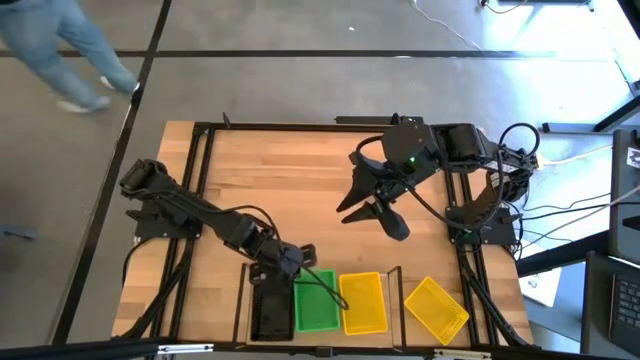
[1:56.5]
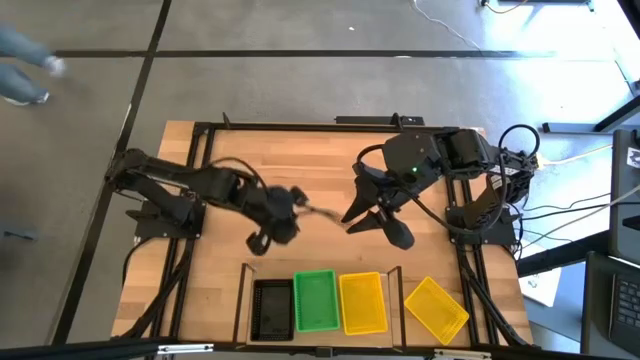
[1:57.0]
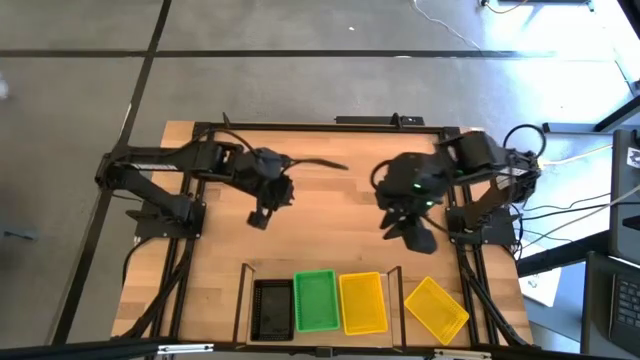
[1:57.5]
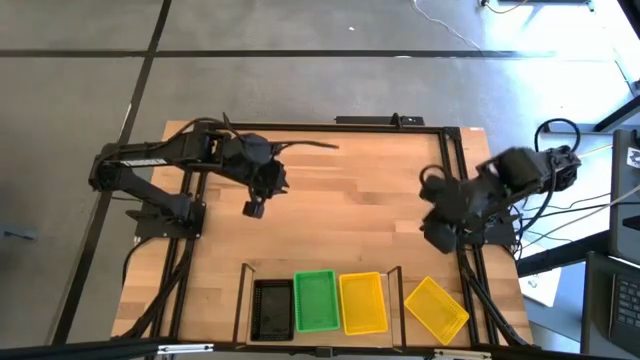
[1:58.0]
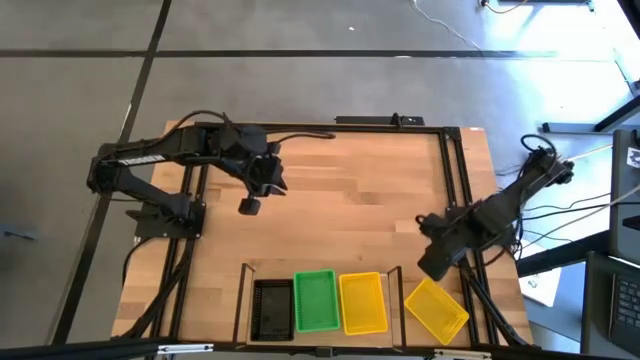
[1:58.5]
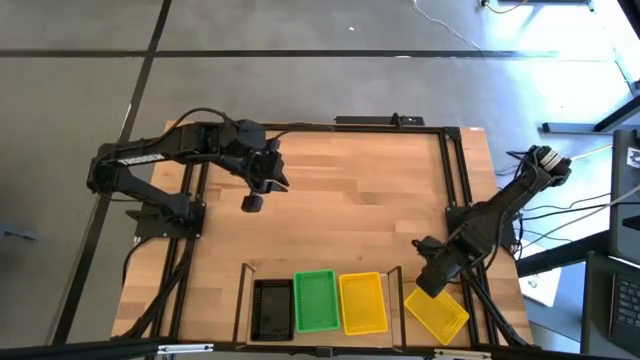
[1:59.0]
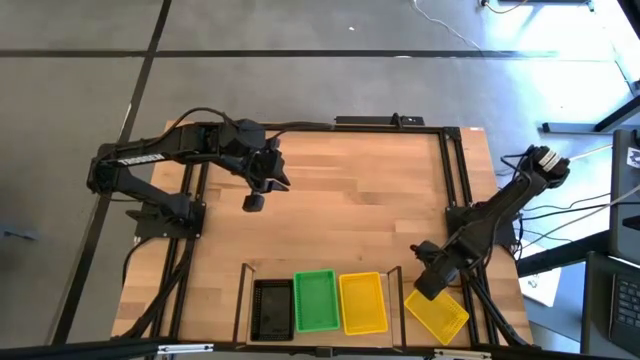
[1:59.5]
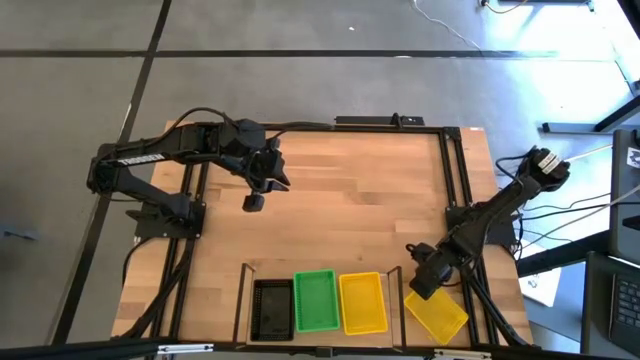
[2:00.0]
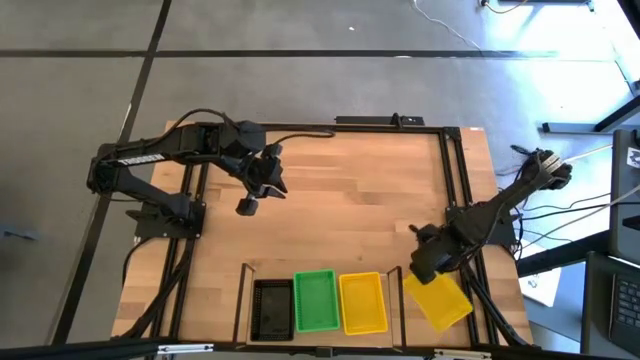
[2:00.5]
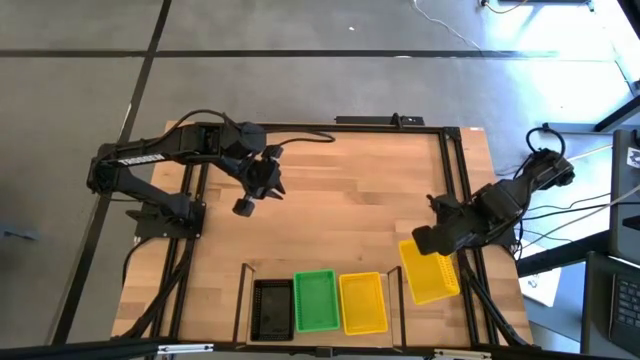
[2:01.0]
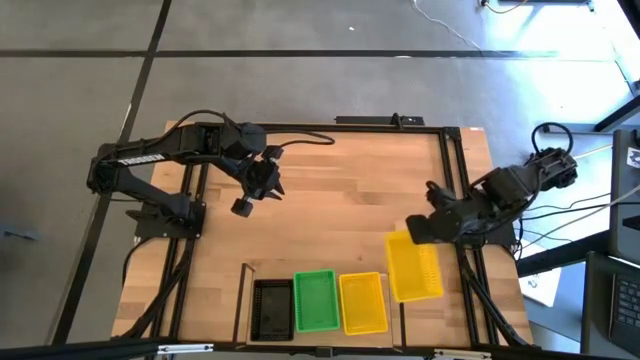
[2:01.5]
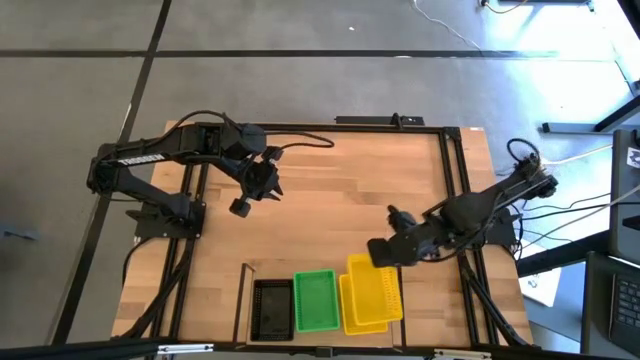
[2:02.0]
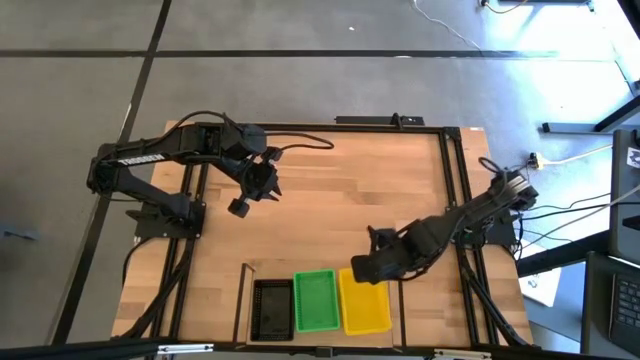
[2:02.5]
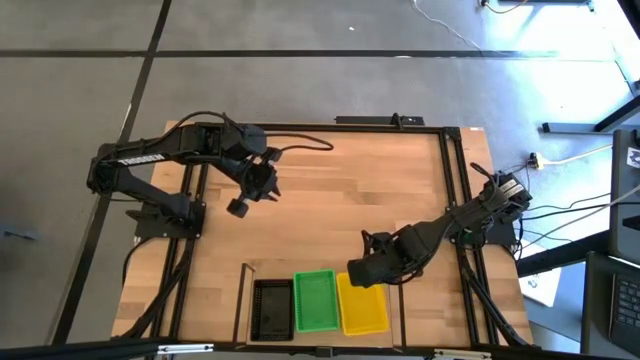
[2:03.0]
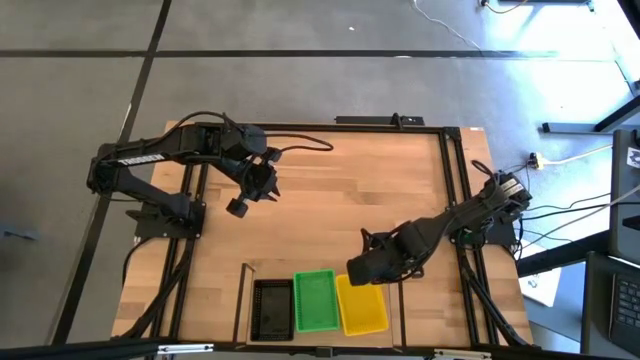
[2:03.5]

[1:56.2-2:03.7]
Task: Stack baskets on shelf by color
Stack the yellow basket on top of the yellow baskets on the shelf

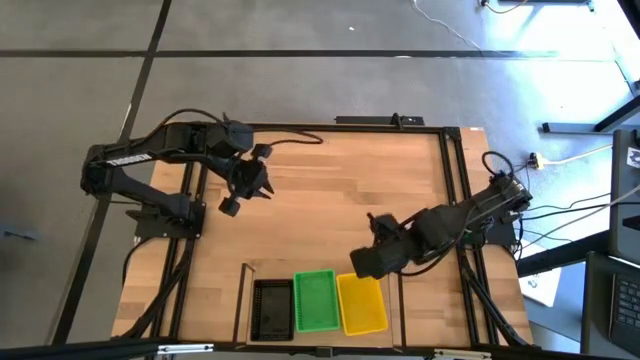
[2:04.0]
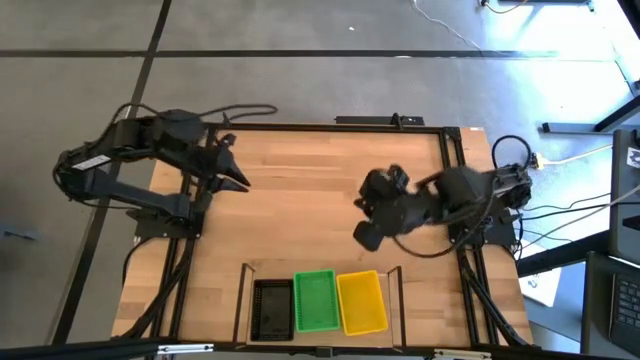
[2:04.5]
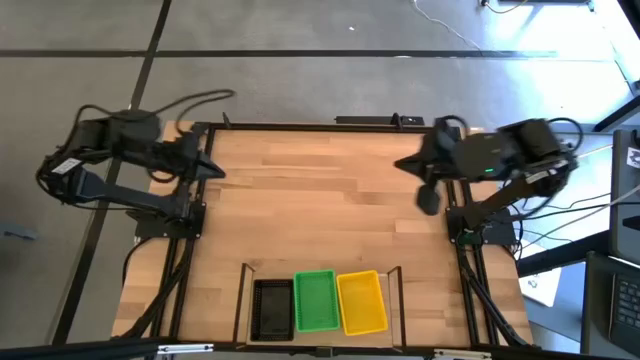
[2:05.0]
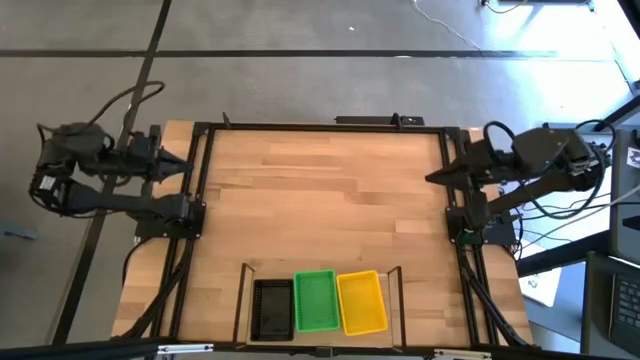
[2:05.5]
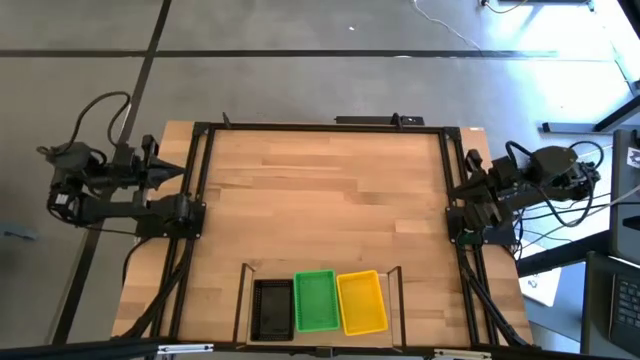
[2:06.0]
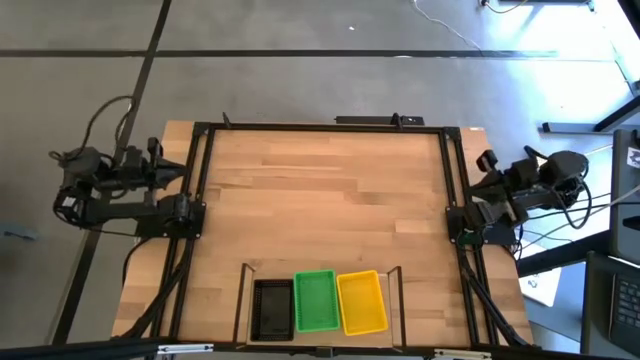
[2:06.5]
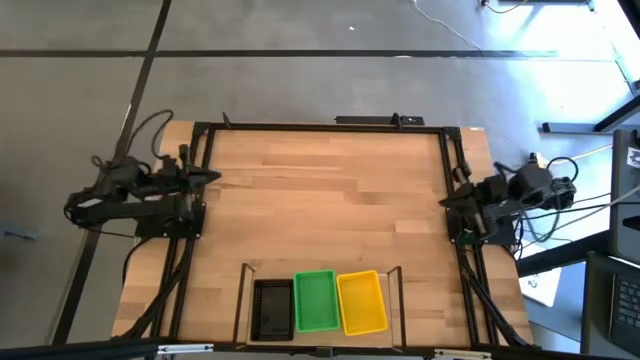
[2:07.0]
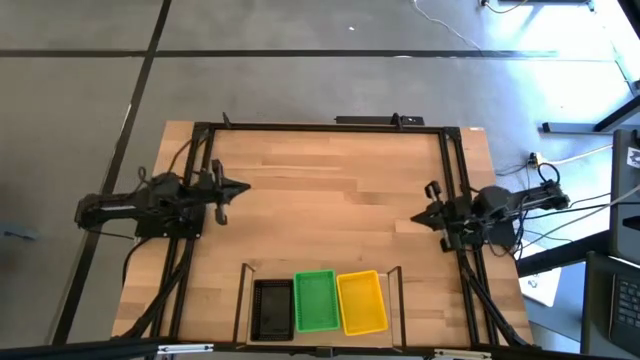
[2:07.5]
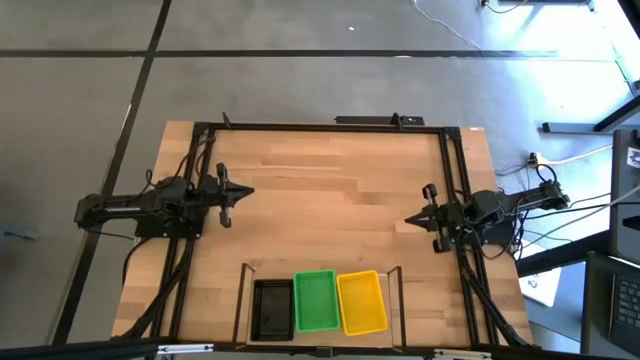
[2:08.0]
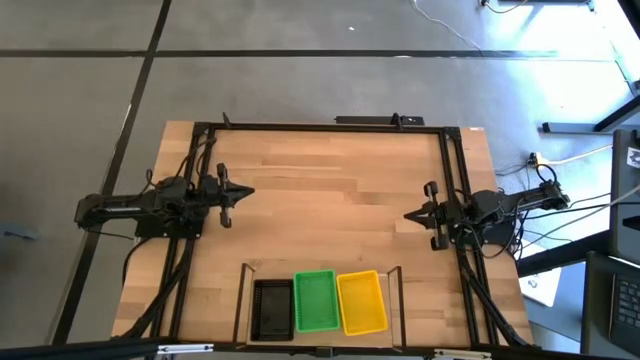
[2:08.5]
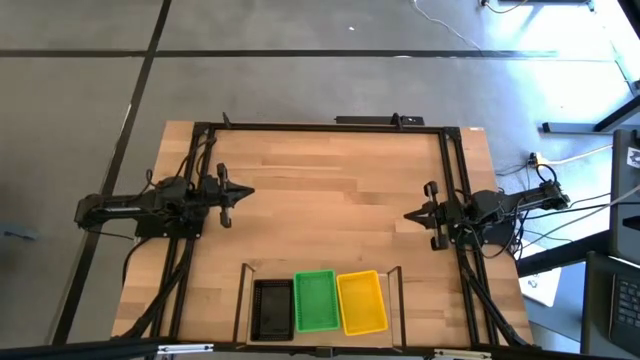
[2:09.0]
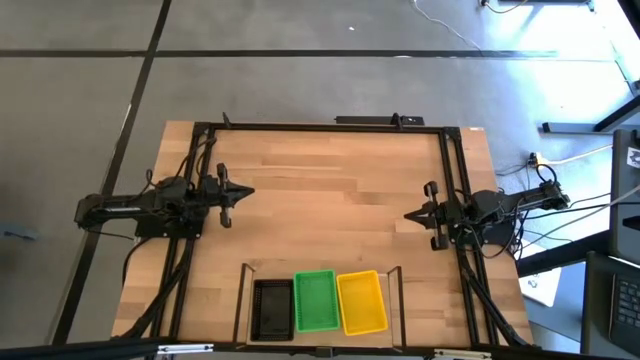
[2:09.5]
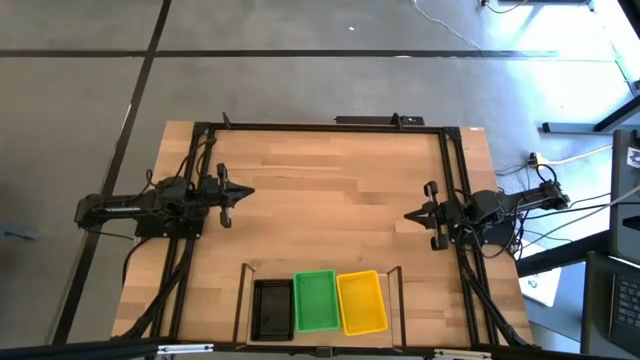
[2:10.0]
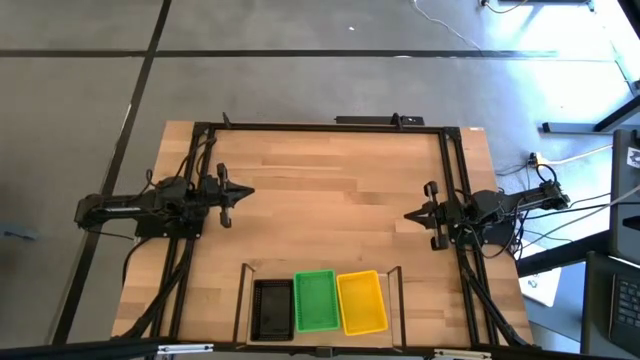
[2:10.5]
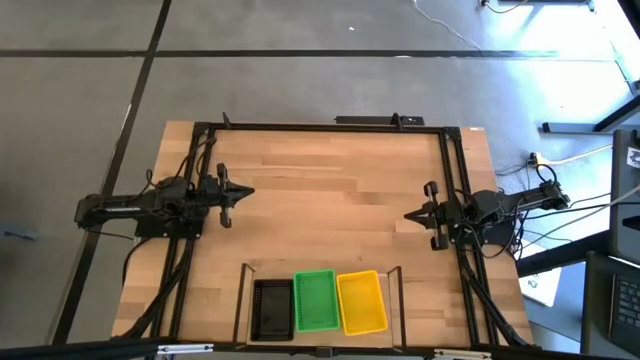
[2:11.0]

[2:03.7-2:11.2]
Return to Home Position

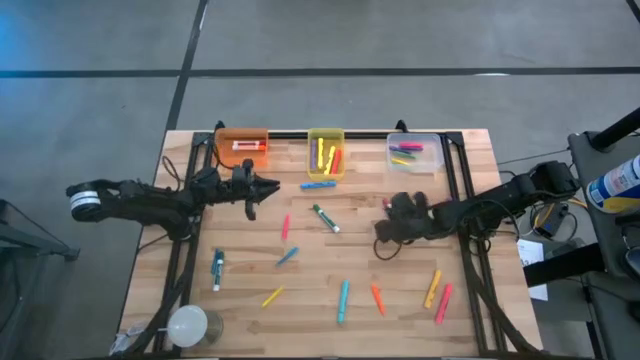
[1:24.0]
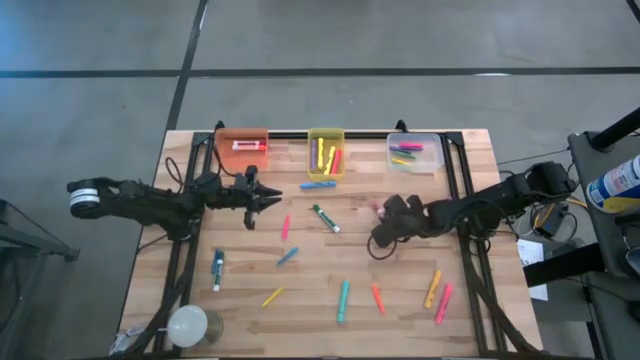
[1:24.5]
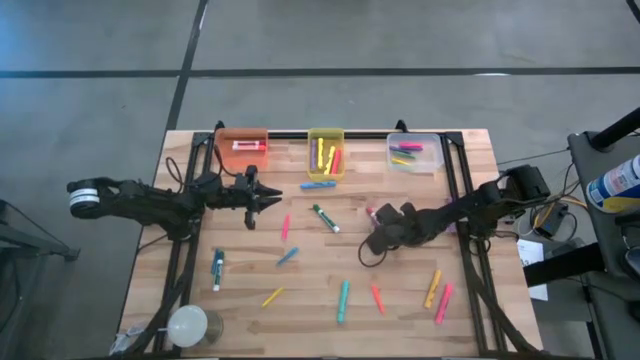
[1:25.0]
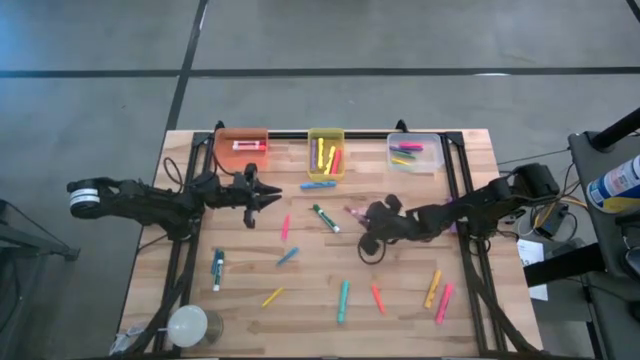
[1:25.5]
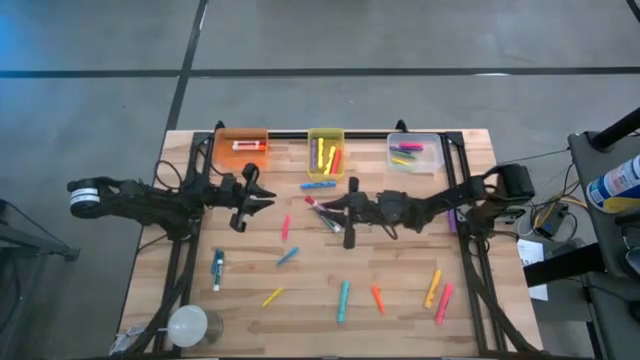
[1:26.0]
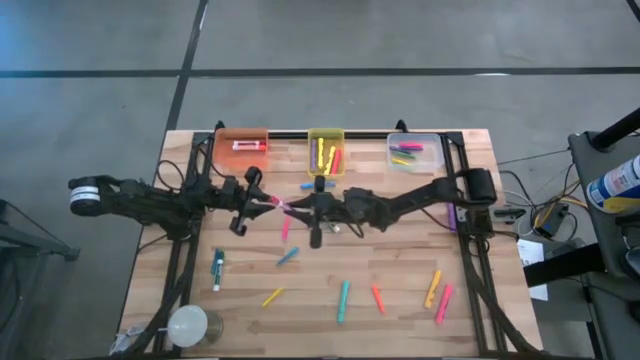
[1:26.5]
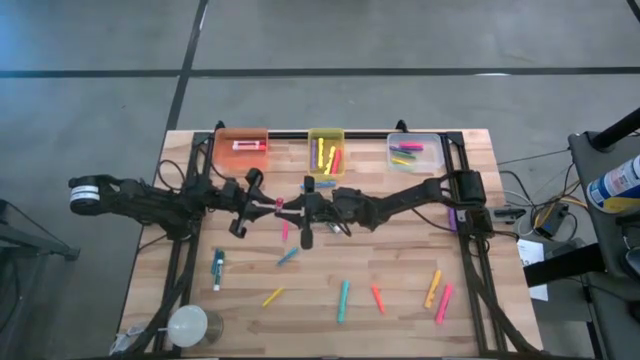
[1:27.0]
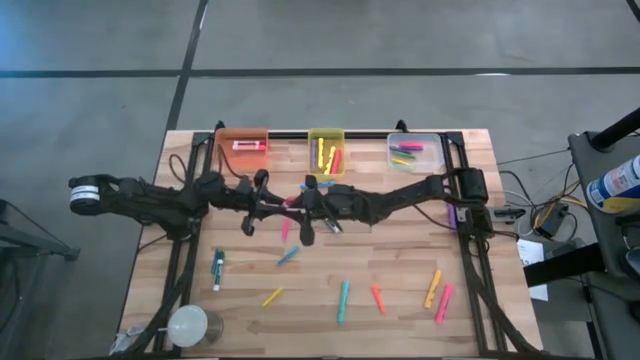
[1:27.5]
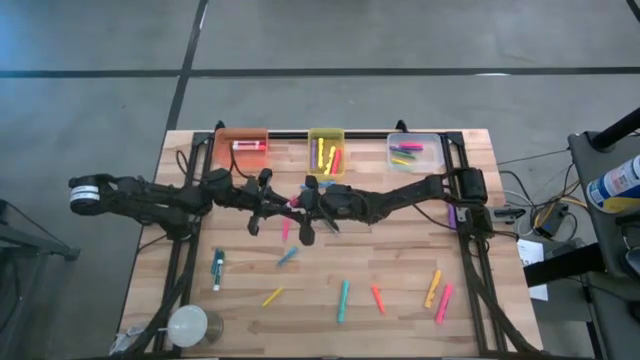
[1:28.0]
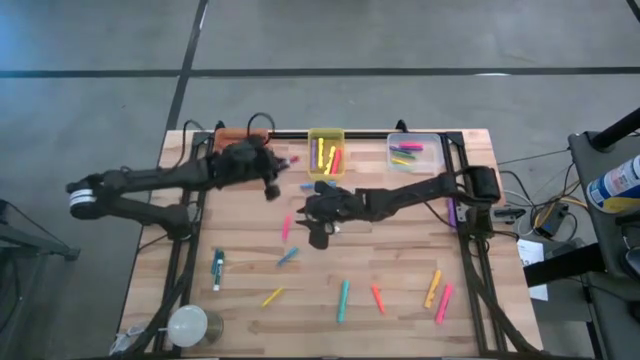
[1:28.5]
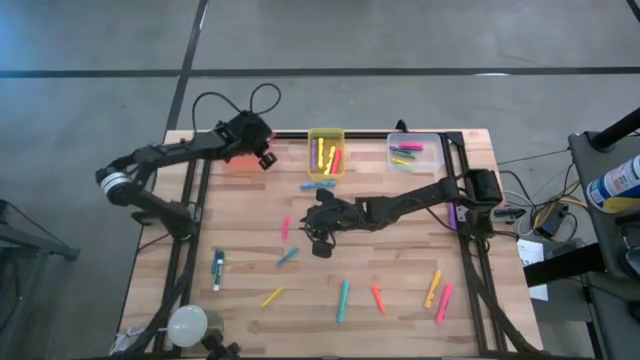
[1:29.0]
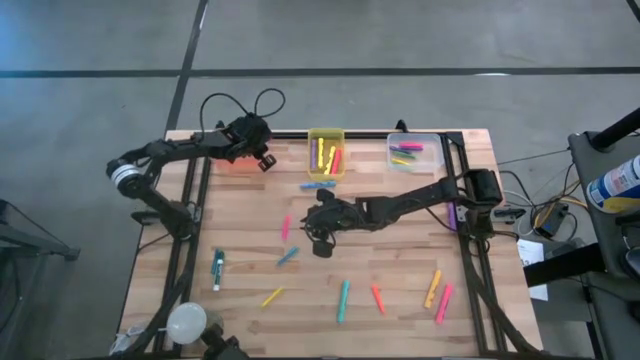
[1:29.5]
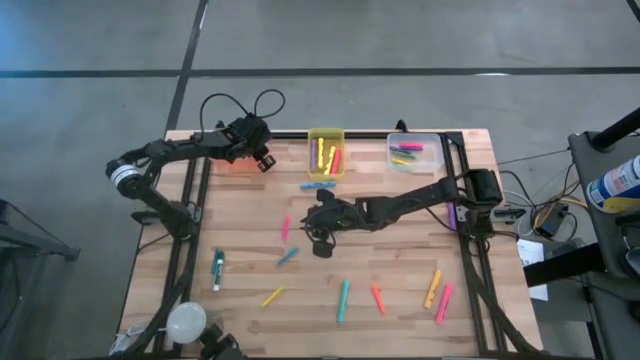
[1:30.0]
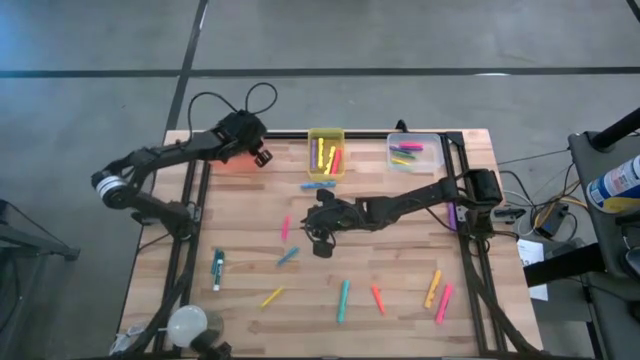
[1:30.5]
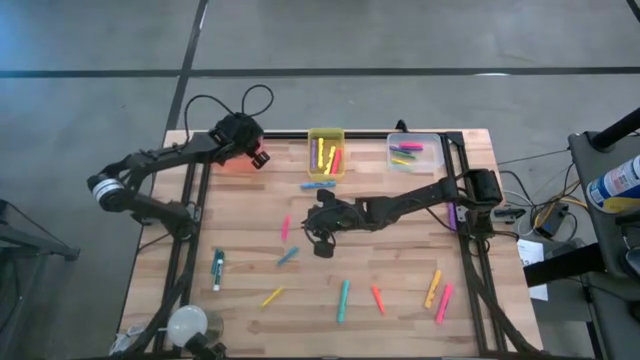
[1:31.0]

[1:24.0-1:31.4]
Task: Pick & Place Markers
Put the pink white marker pen into the orange bin
